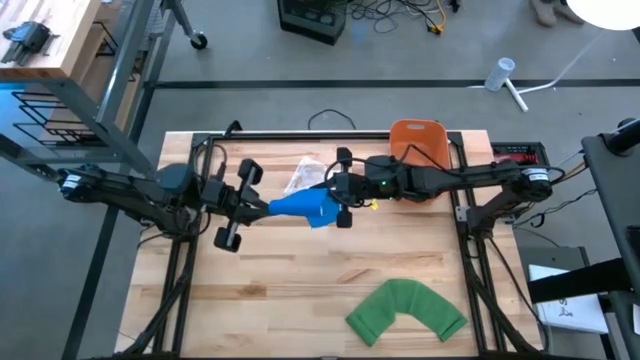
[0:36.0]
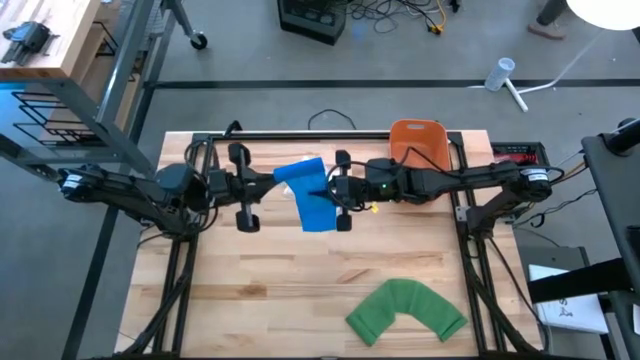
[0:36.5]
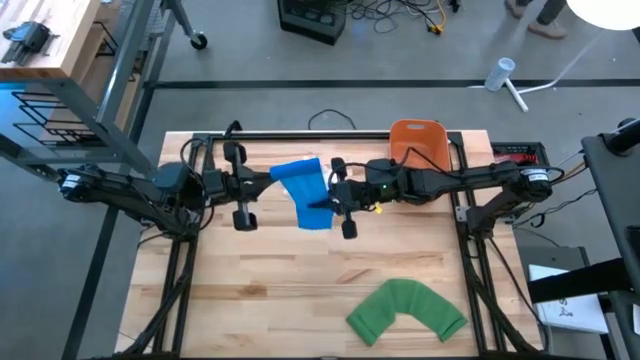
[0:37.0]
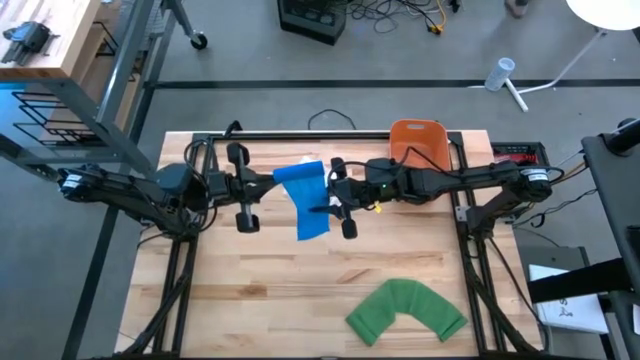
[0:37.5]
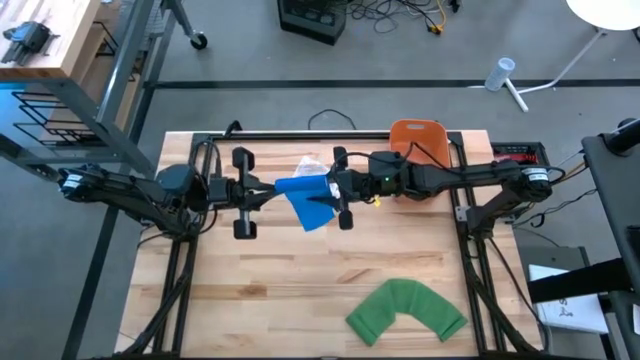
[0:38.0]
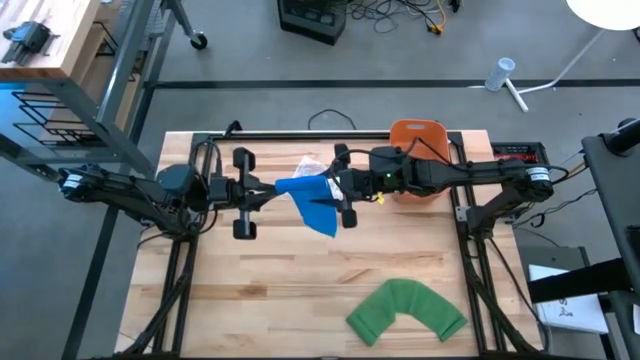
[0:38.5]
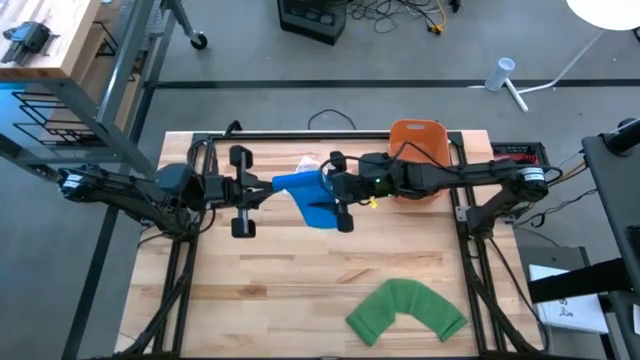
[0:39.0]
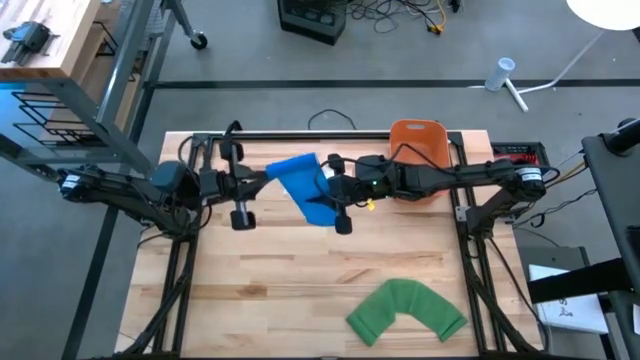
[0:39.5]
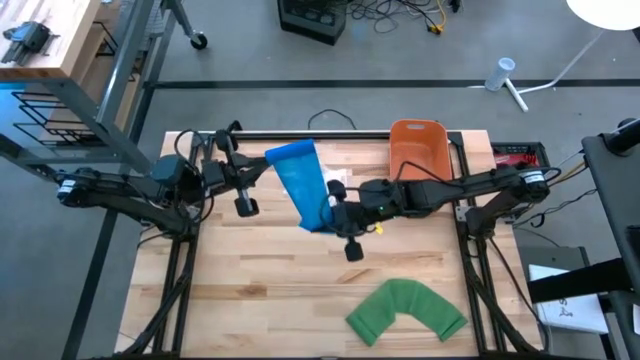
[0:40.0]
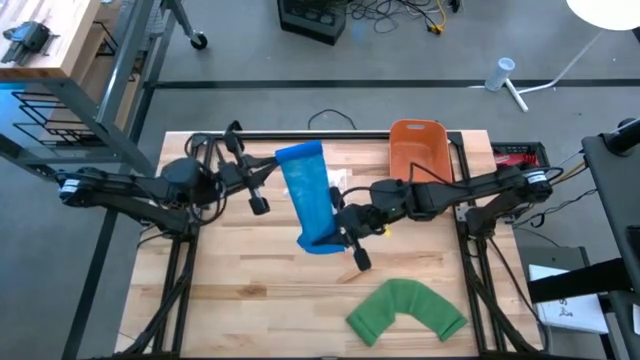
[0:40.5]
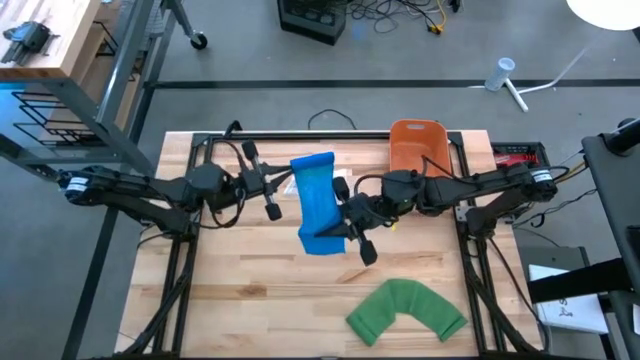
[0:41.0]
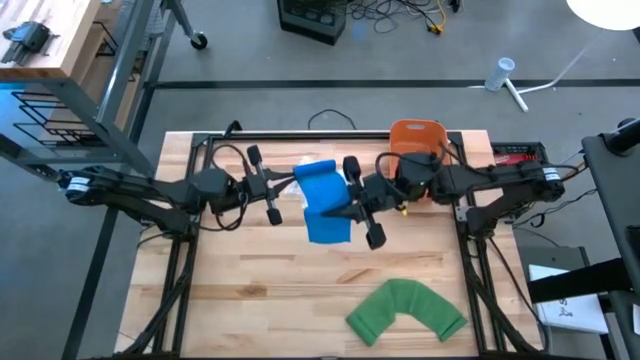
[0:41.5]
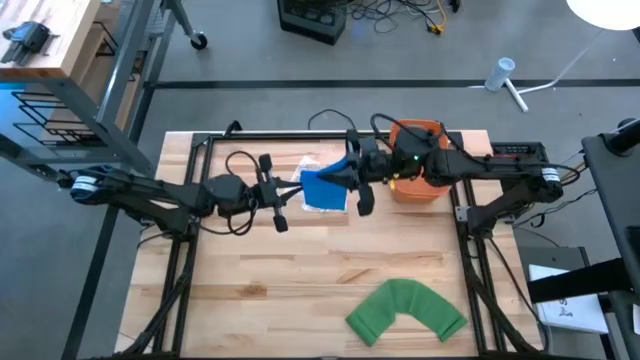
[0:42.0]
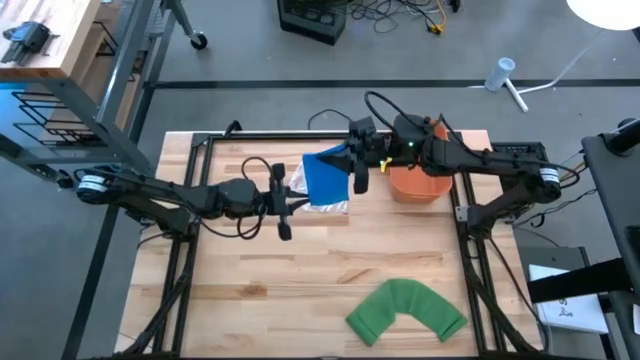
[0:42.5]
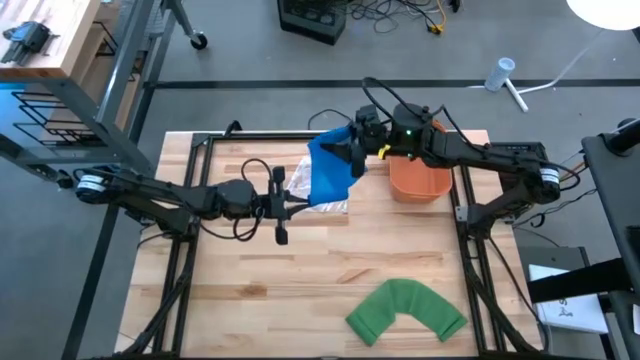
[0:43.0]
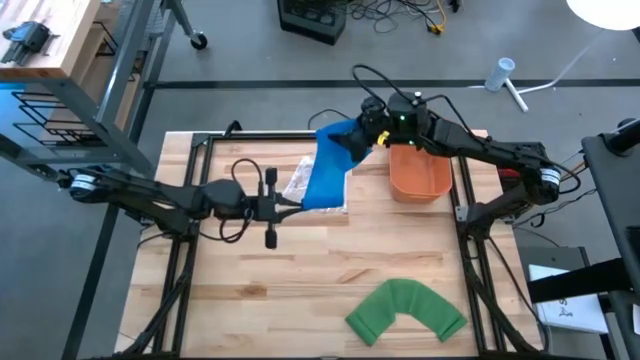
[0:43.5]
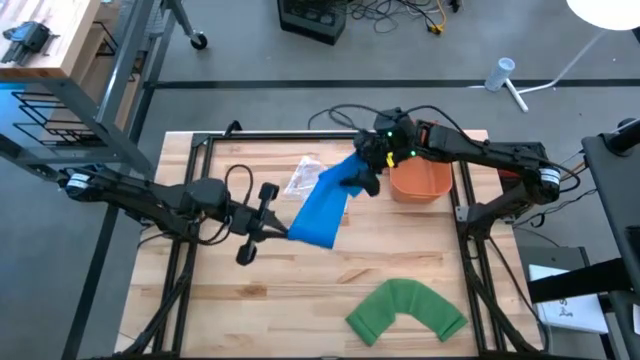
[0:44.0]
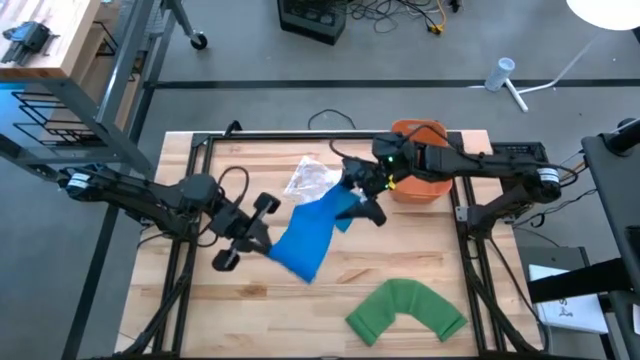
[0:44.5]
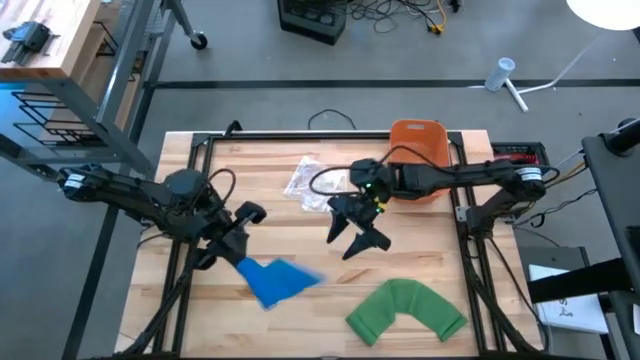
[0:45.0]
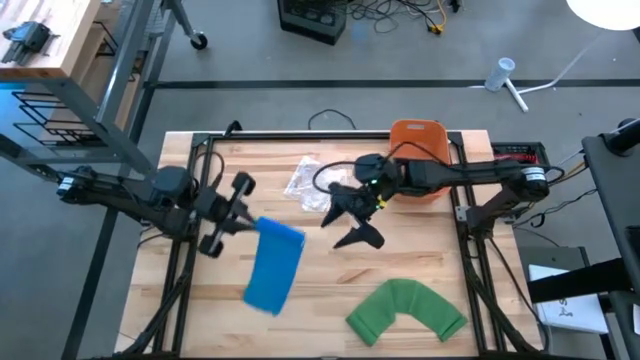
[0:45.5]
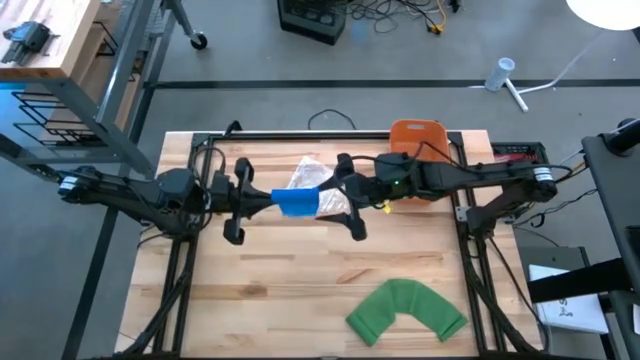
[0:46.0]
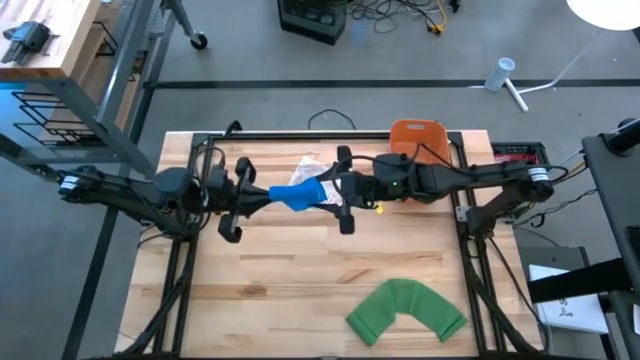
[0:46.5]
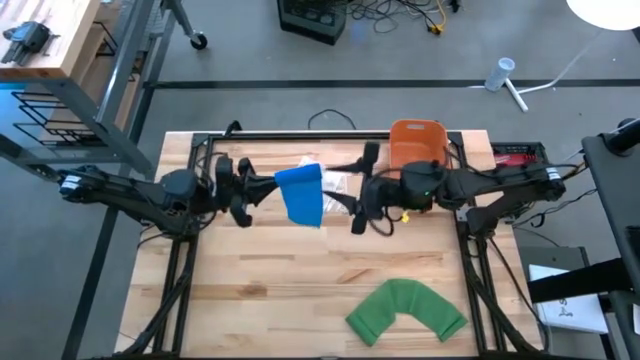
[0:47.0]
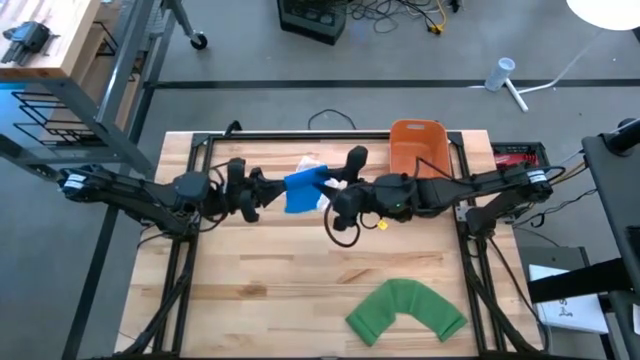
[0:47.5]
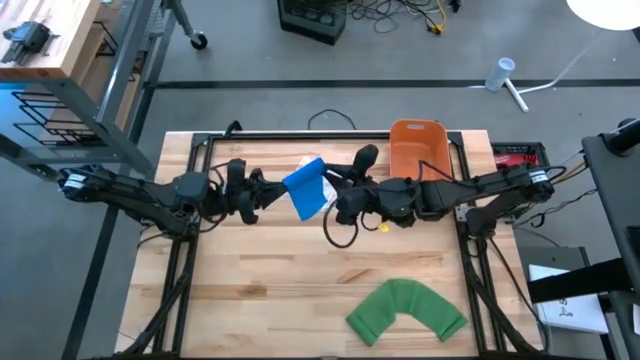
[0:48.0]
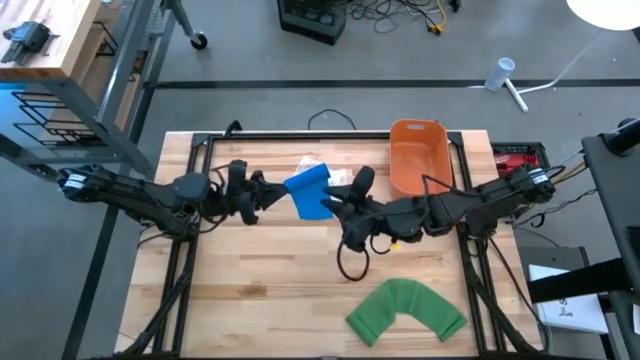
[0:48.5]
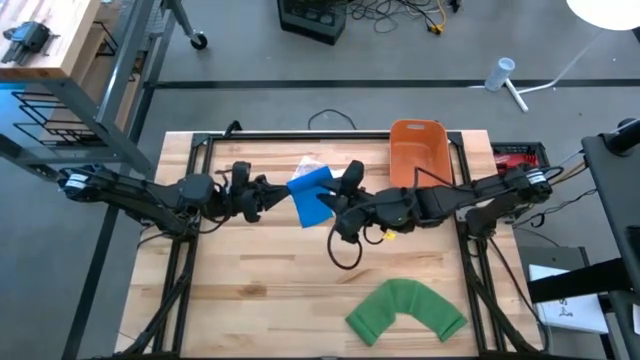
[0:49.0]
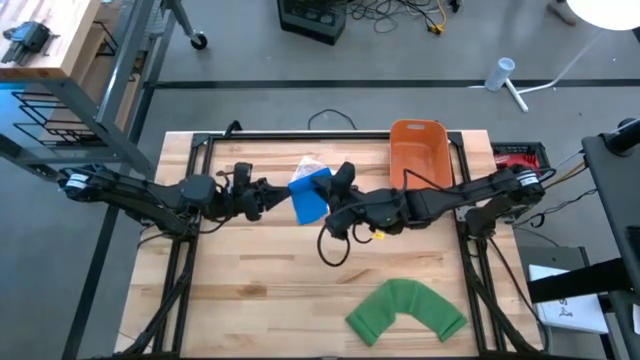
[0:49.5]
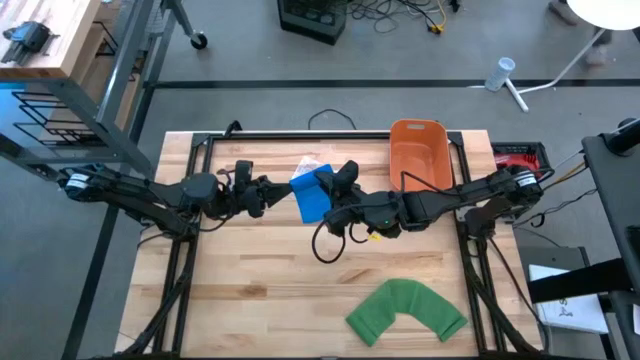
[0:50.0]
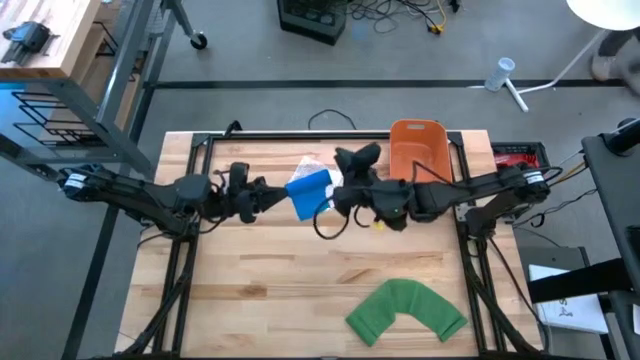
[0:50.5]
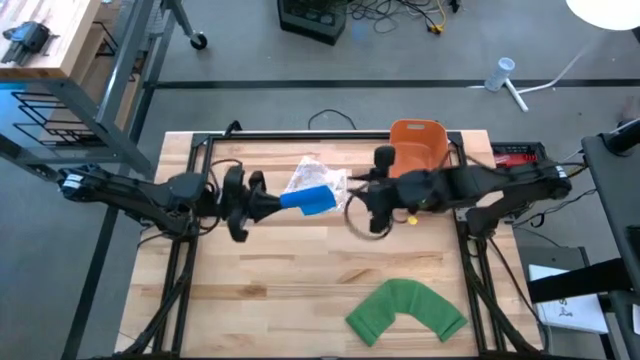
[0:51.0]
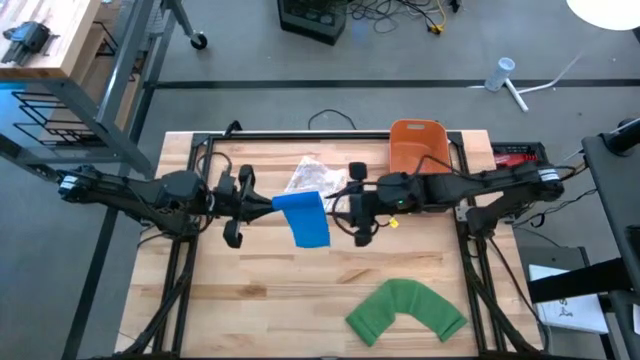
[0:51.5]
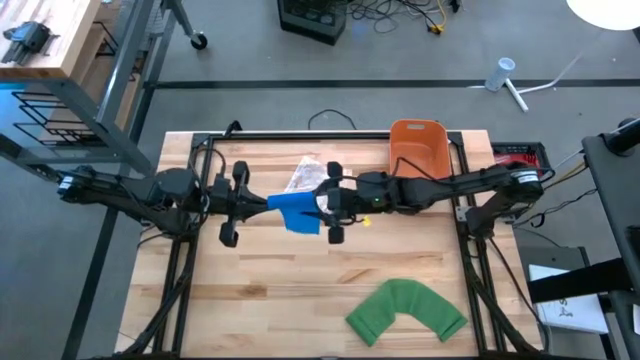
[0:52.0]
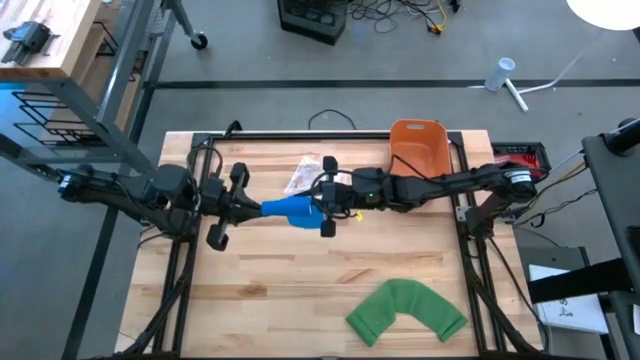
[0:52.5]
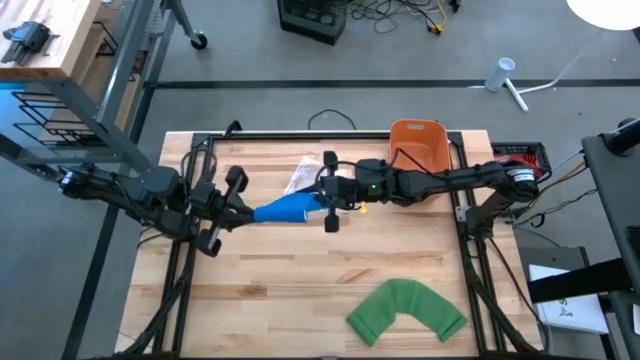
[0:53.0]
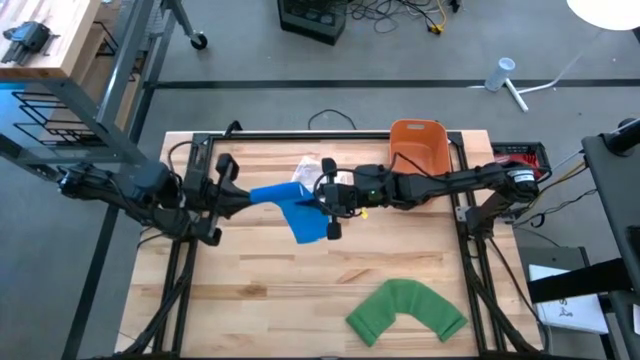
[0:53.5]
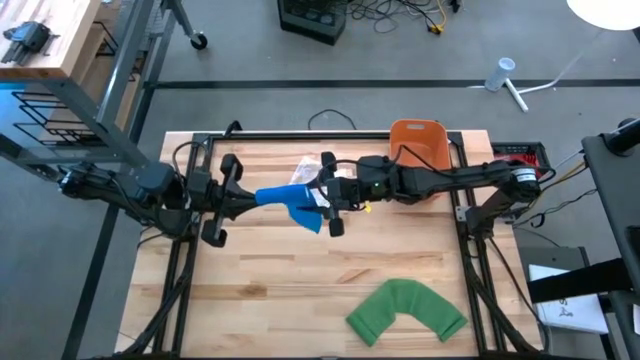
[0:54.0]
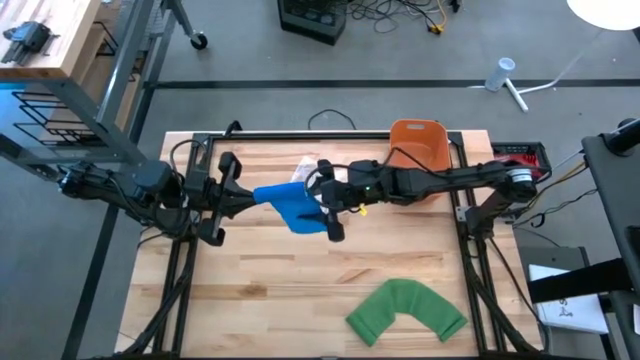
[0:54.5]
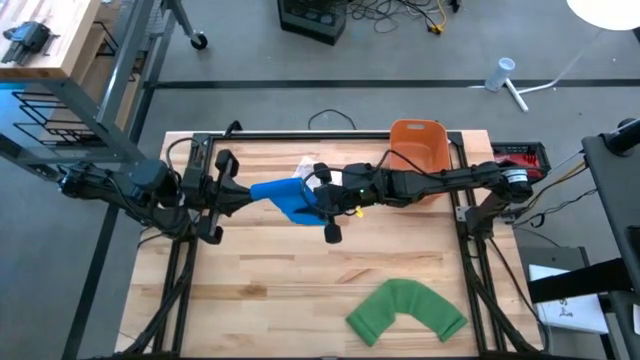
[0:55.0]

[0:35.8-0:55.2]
Task: Roll bandage
Roll the blue bandage

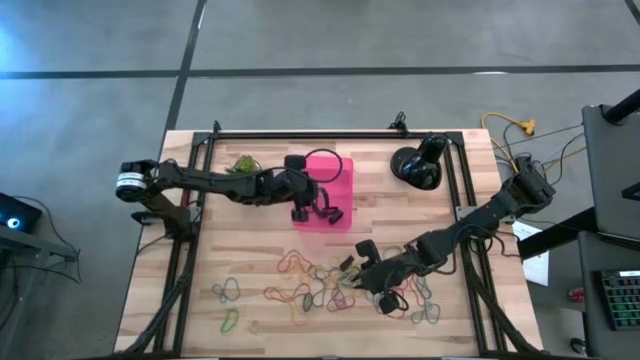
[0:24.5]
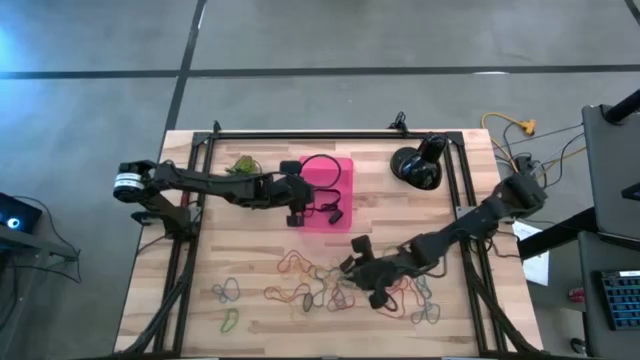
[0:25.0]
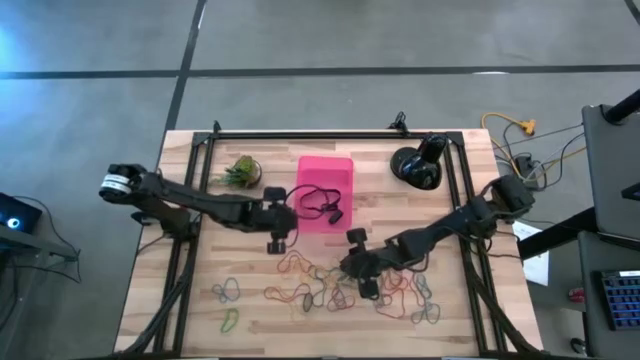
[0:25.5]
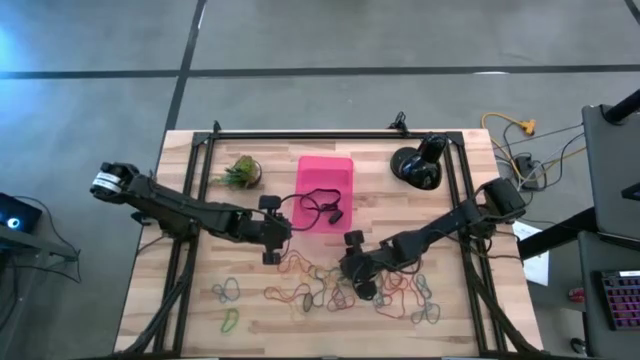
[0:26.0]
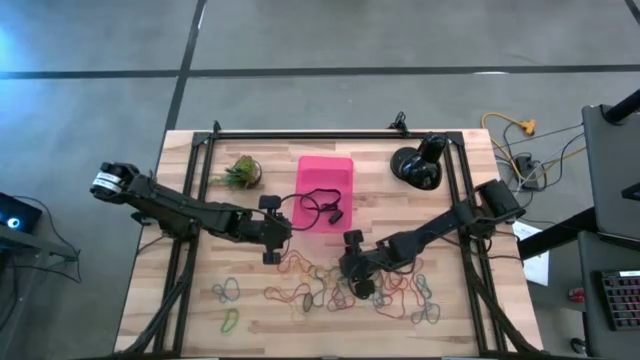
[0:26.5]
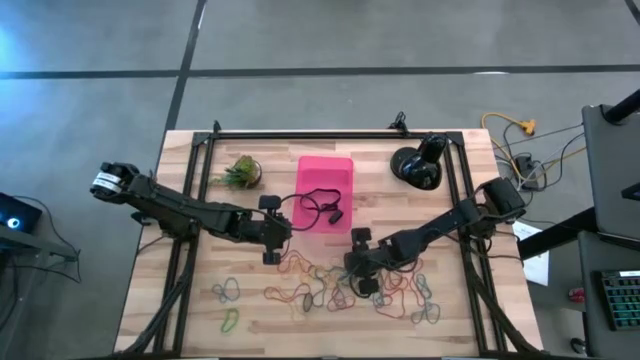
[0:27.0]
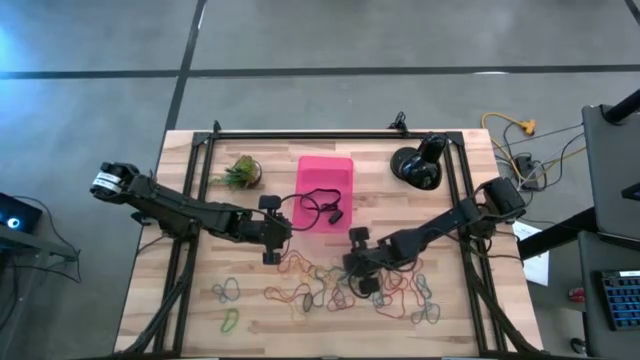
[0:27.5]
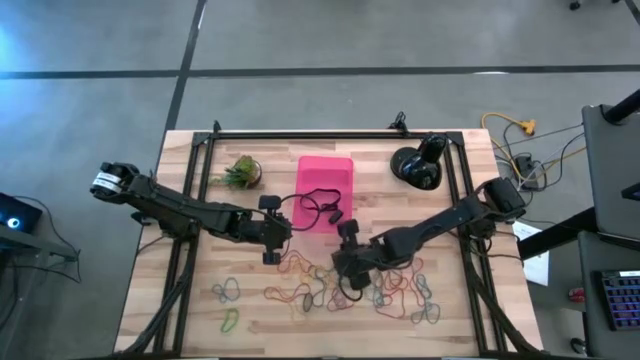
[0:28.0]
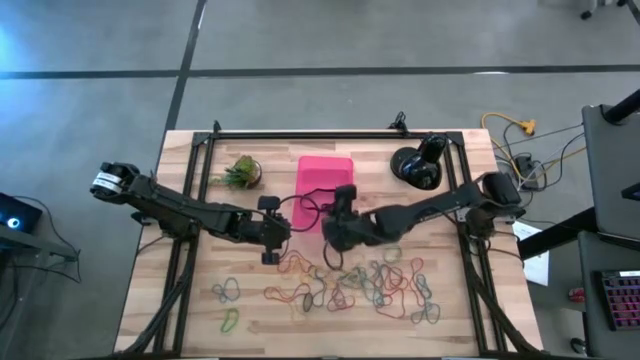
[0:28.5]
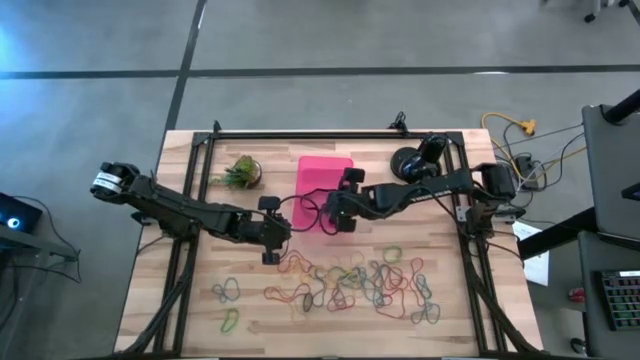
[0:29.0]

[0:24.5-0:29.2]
Task: Pick and place rubber bands into bin
Put the black rubber bands into the pink bin
